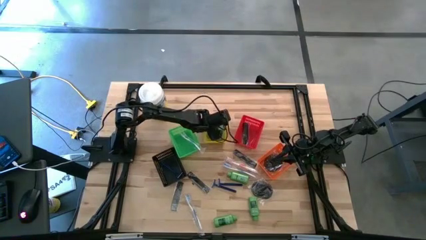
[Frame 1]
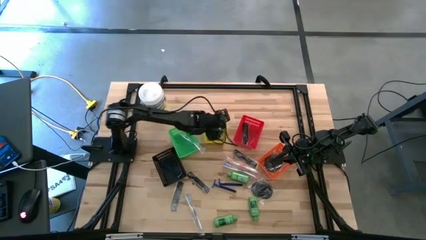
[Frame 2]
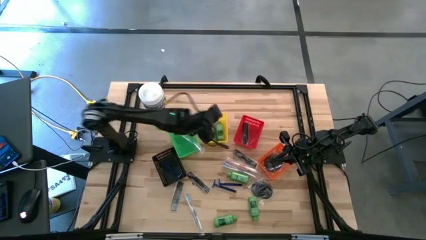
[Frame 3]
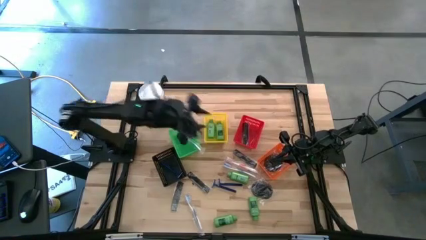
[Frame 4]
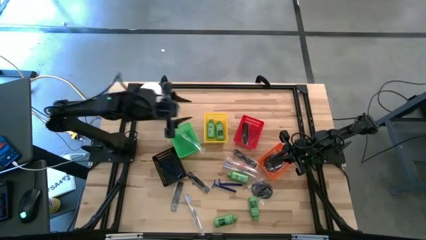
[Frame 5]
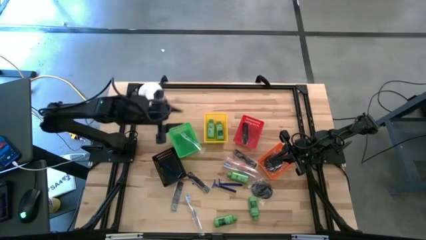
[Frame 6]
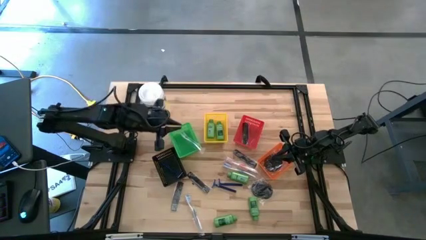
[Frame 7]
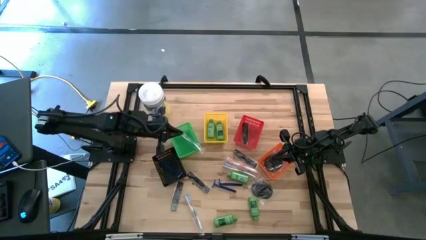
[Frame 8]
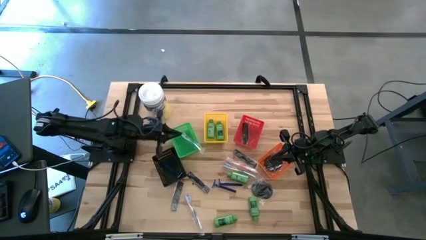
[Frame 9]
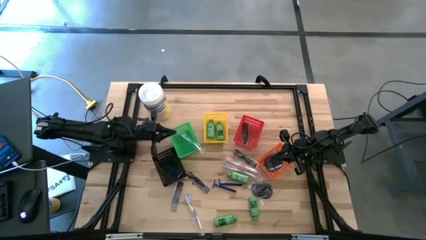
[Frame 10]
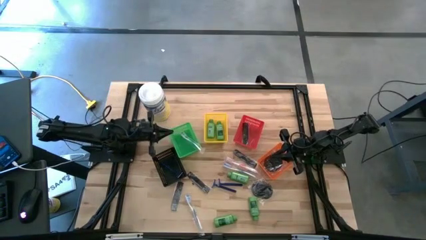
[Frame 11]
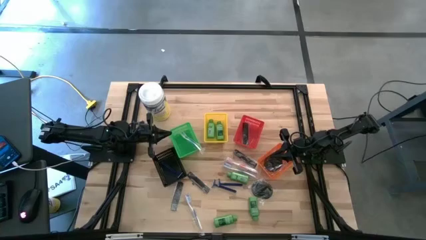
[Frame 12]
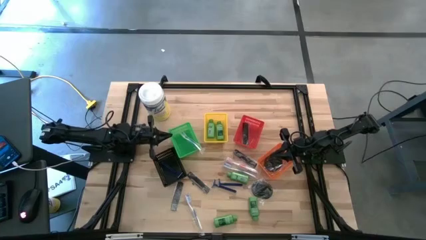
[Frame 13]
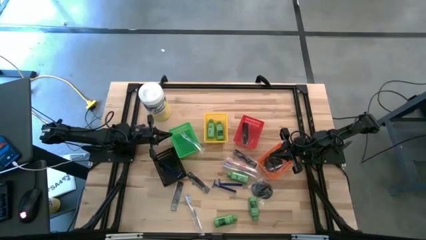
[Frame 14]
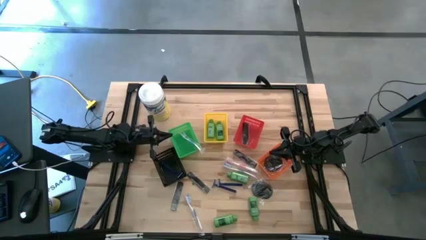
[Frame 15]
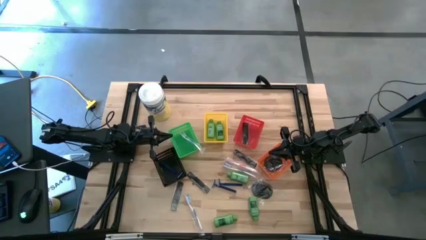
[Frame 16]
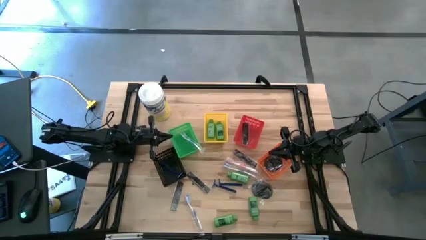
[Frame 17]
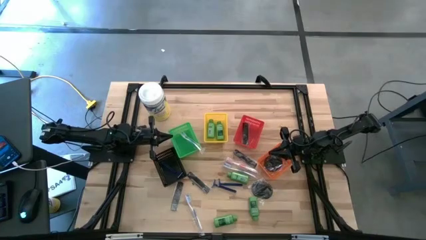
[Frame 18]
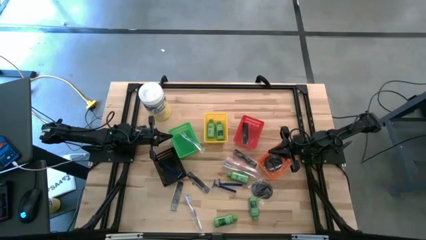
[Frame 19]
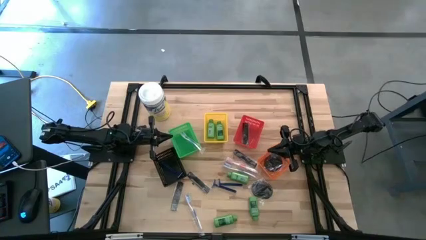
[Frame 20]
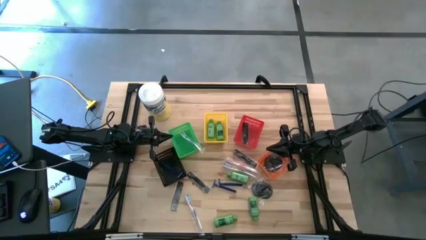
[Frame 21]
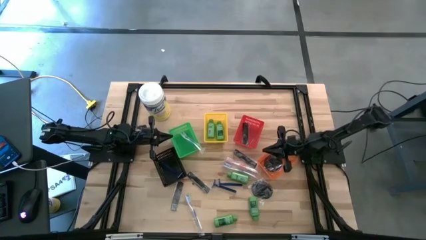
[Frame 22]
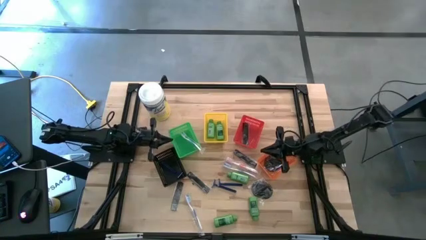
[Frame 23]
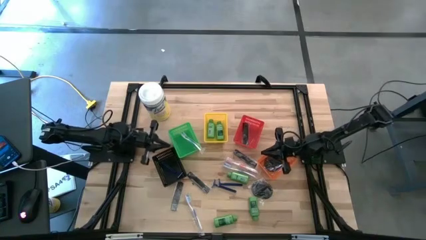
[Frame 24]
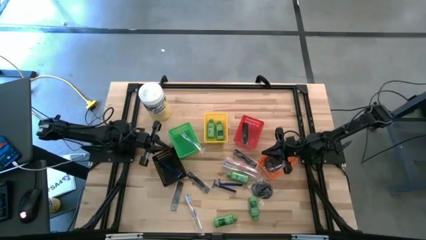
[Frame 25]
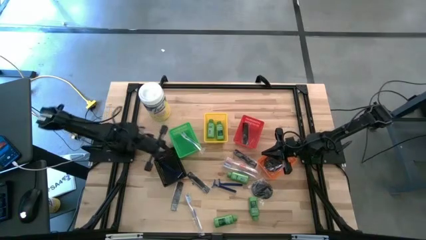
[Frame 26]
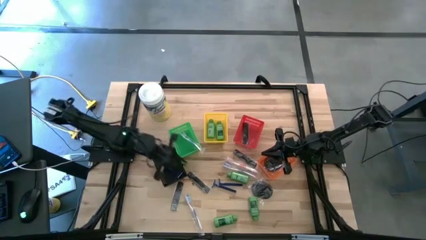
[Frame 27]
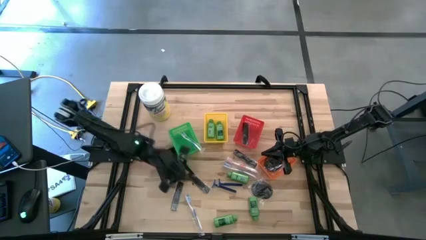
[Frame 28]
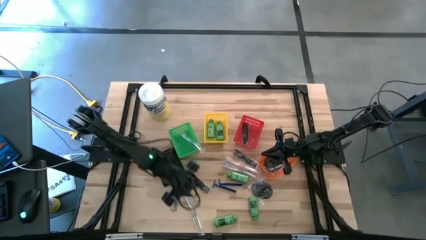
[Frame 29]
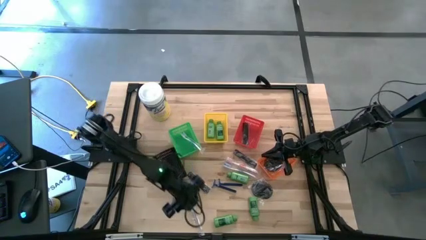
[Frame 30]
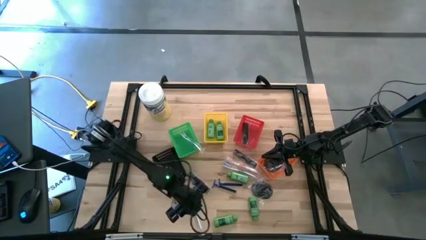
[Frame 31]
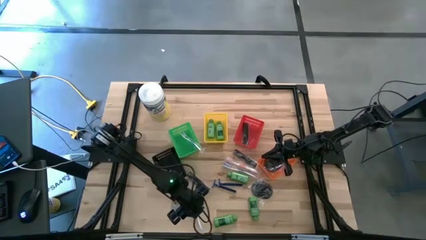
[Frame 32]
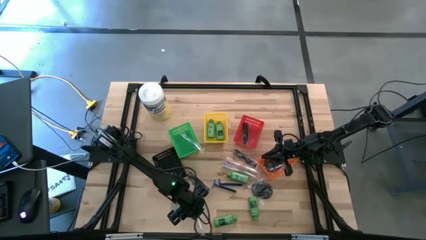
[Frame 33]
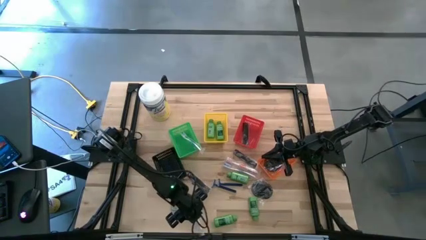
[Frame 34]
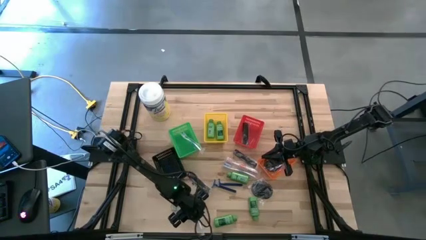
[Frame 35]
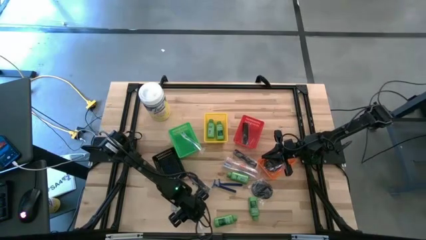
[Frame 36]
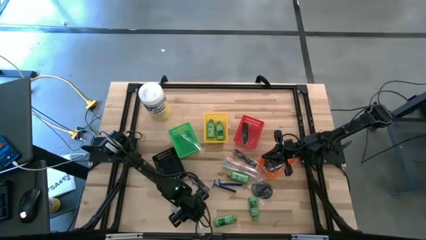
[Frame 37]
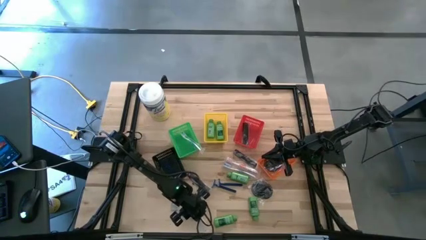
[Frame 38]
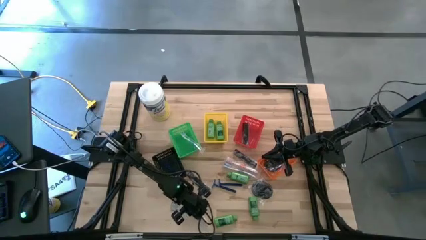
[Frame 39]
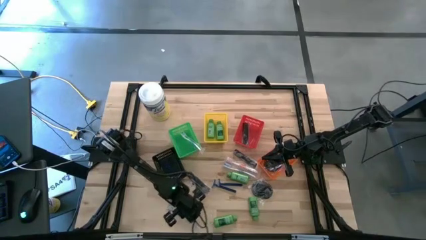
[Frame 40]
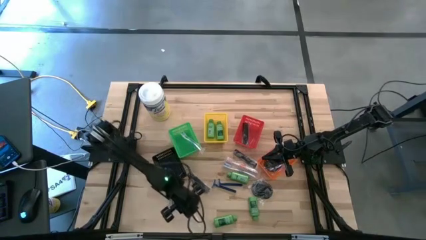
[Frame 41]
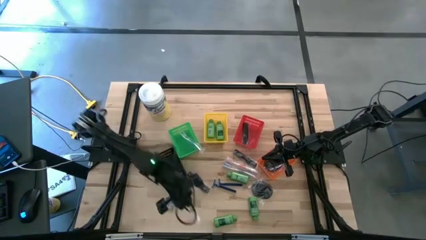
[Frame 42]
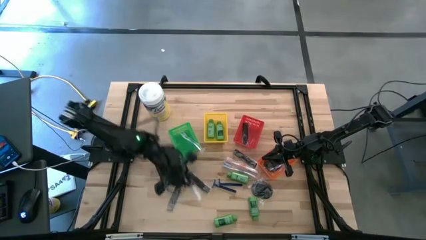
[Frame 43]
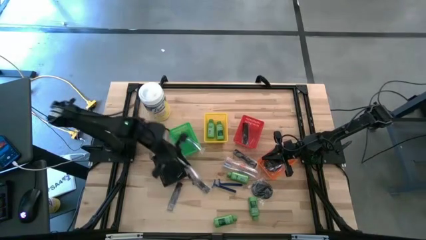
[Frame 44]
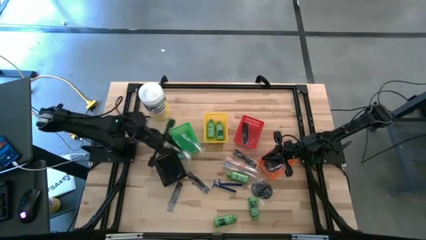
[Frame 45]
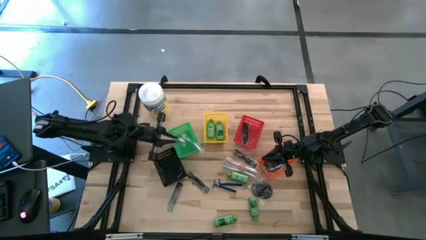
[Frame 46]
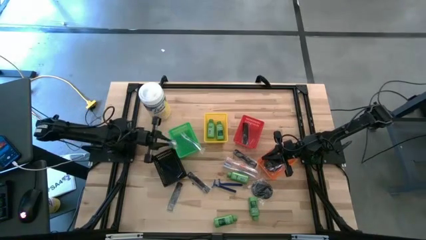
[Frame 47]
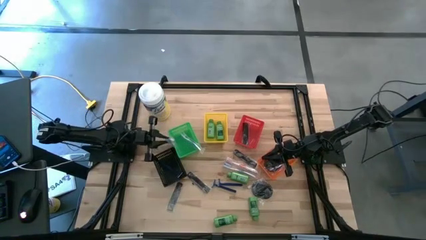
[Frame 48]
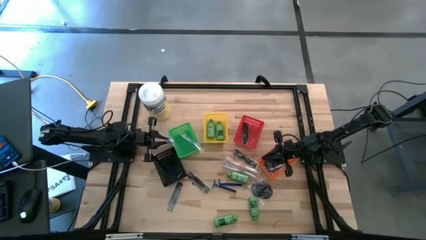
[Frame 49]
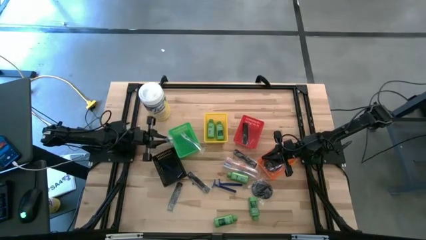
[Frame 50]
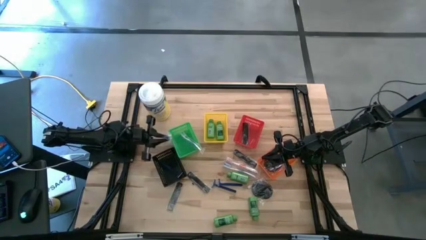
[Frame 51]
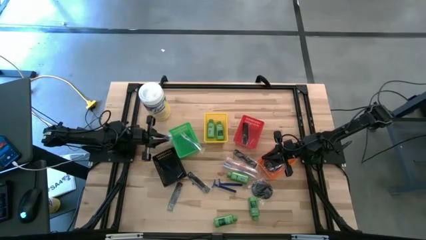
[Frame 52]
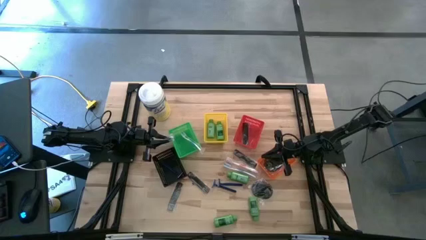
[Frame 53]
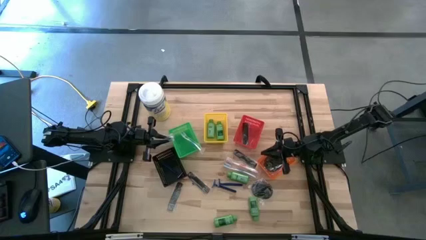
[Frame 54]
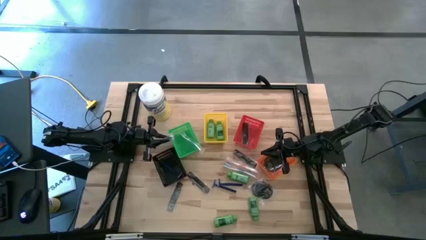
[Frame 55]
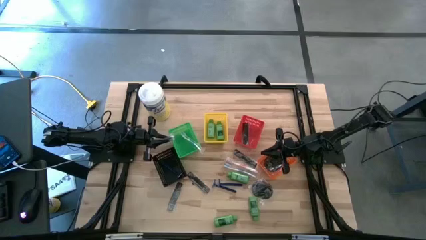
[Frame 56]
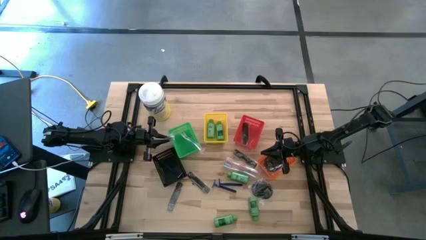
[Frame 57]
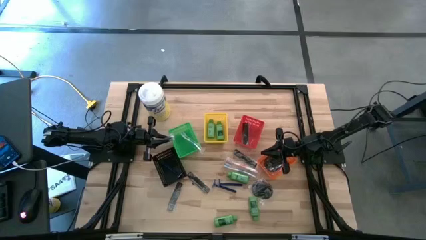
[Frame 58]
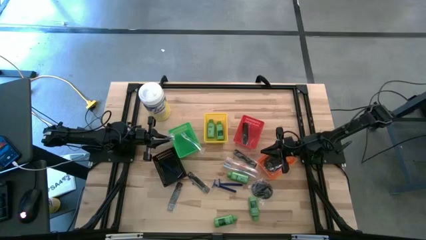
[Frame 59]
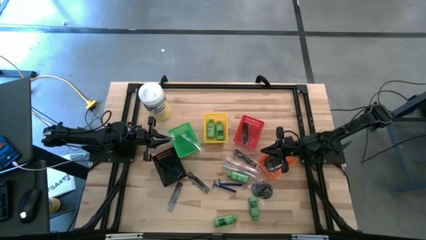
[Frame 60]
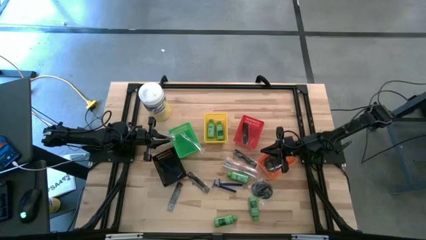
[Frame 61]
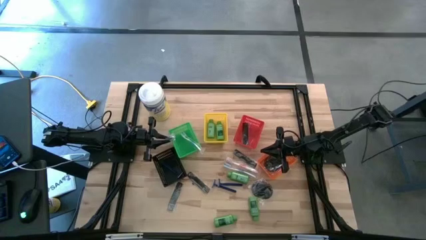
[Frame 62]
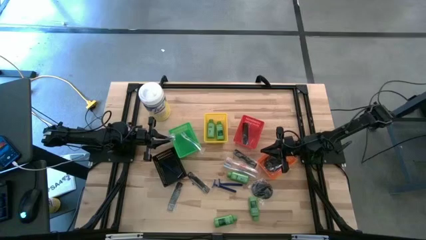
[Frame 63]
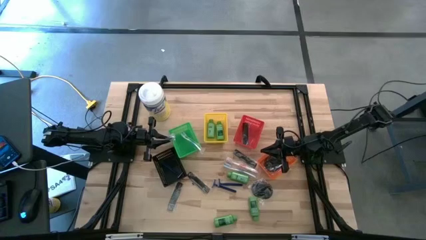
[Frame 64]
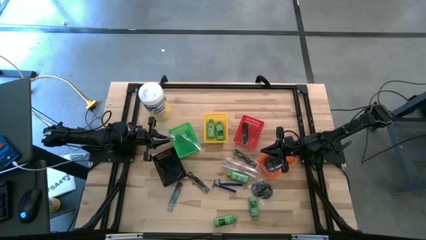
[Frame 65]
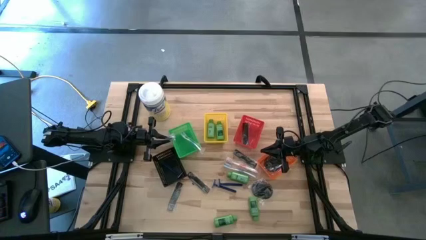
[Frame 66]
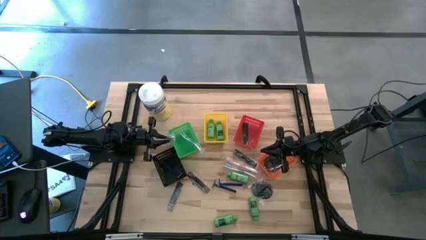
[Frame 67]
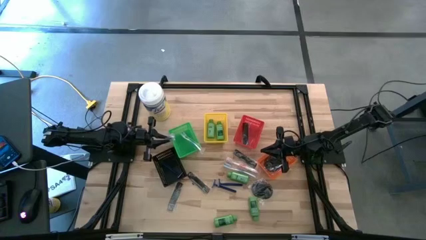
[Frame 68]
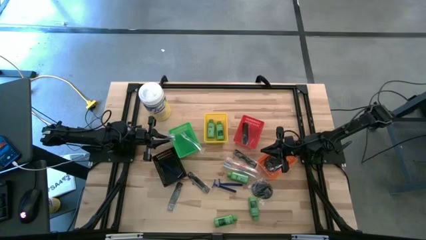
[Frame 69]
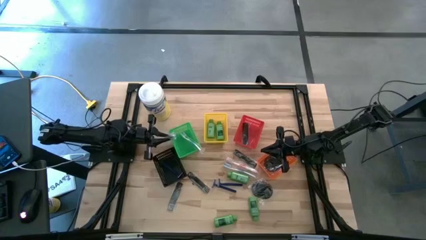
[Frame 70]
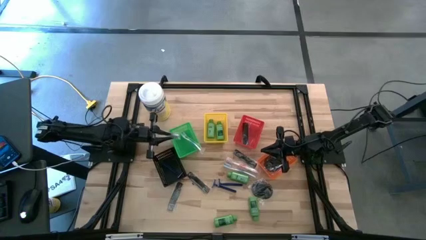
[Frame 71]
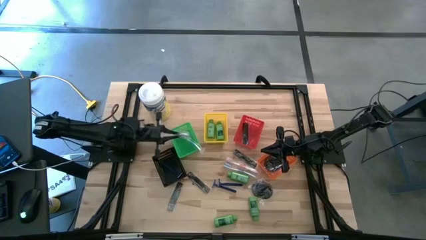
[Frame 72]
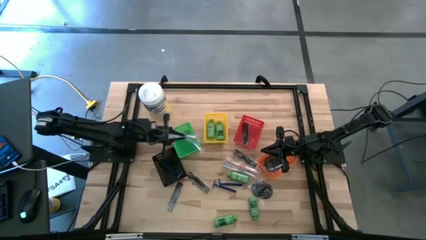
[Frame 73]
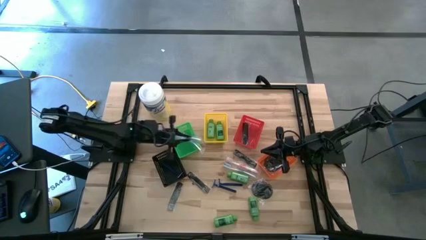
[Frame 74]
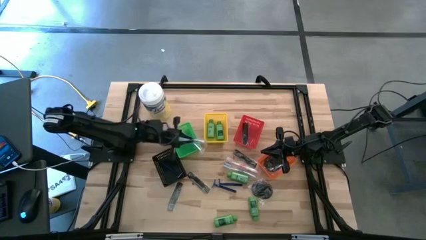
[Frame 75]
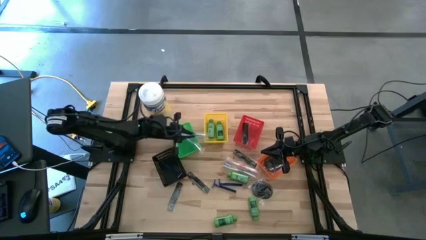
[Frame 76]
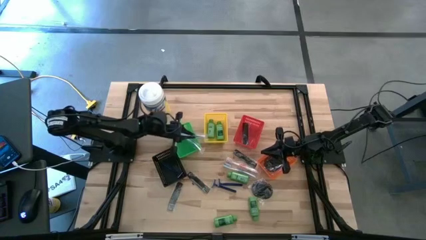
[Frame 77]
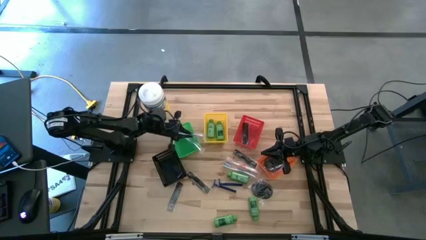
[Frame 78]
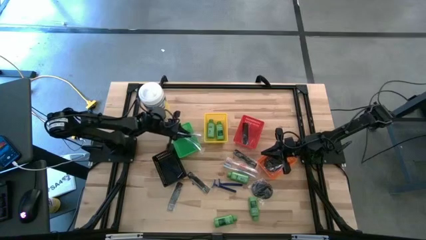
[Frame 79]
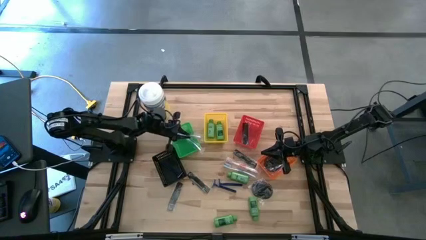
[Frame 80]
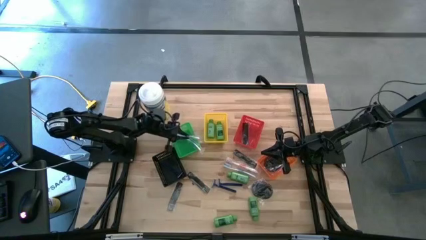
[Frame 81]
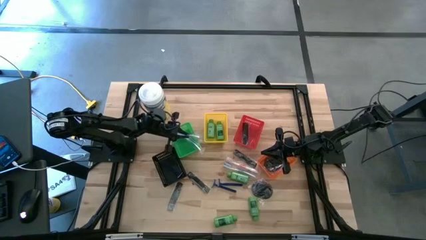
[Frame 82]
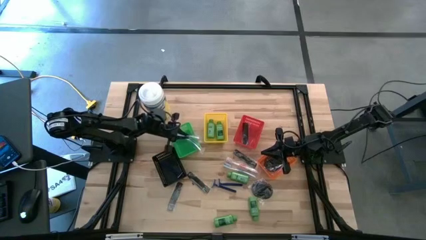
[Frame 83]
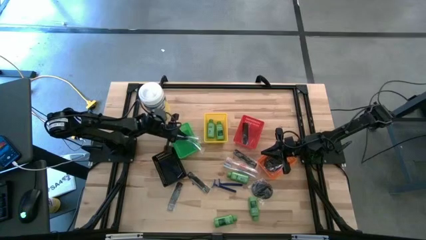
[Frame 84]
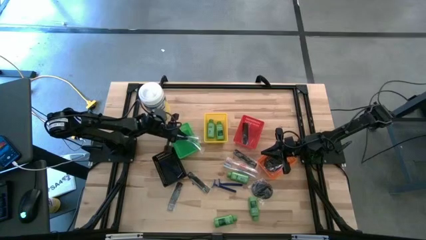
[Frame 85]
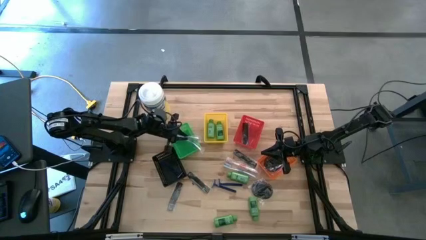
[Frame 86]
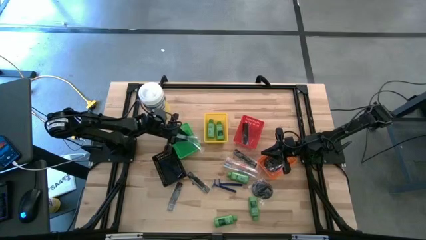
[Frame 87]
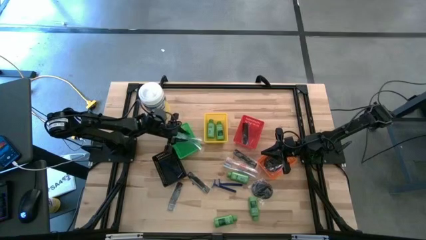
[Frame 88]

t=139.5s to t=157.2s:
Task: Pick & Place Travel size toiletries
Put the blue toothbrush into the green bin
